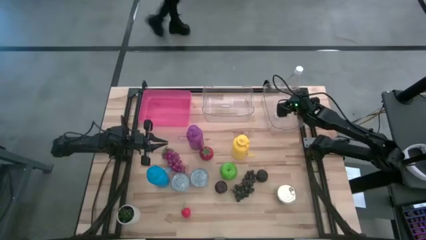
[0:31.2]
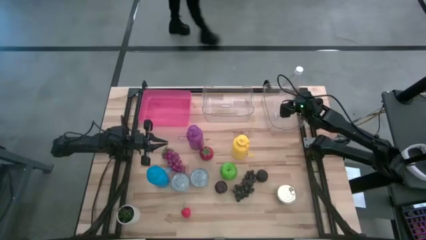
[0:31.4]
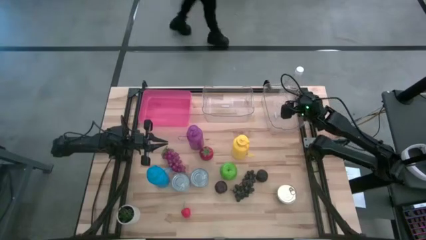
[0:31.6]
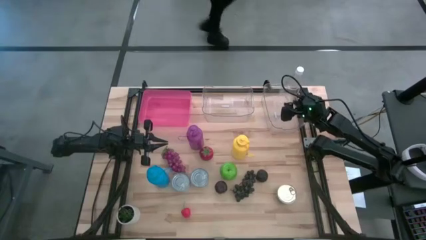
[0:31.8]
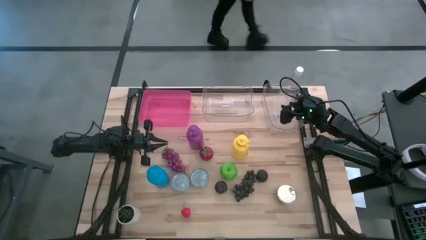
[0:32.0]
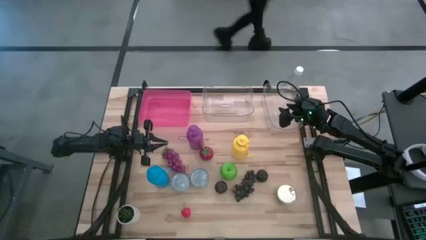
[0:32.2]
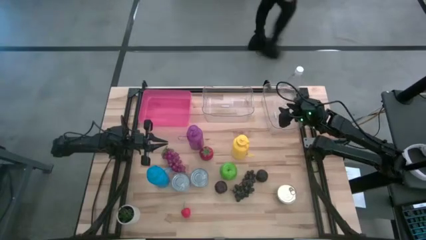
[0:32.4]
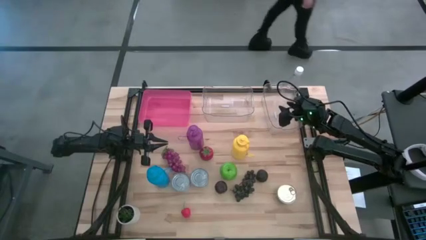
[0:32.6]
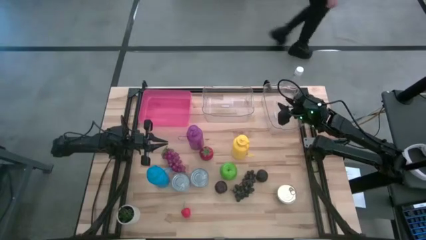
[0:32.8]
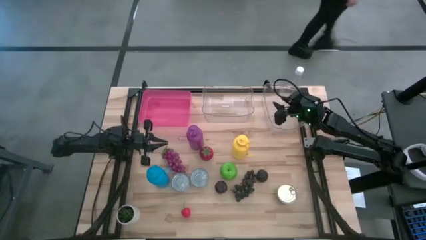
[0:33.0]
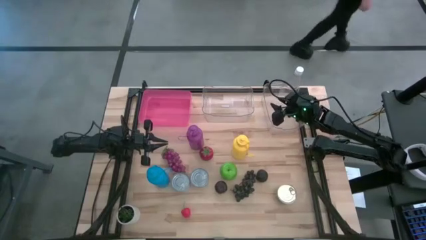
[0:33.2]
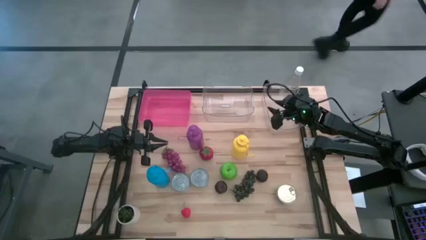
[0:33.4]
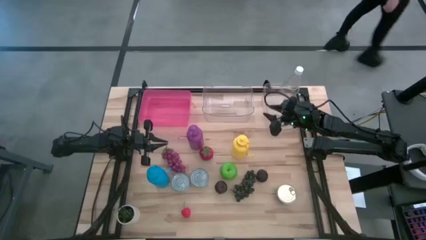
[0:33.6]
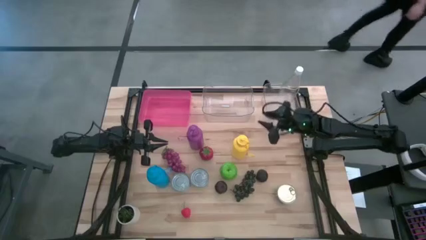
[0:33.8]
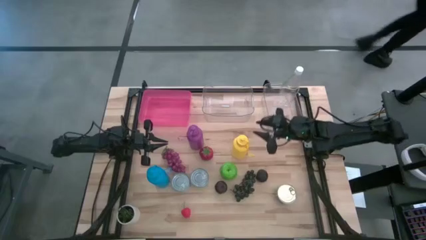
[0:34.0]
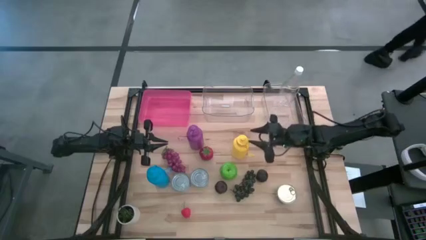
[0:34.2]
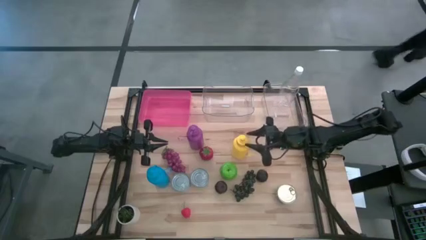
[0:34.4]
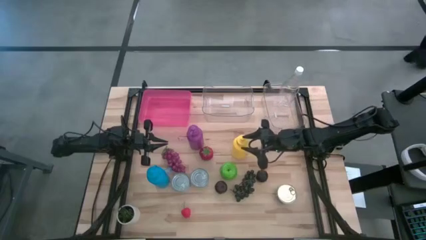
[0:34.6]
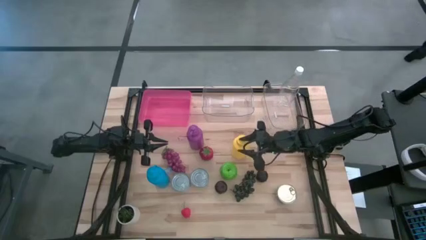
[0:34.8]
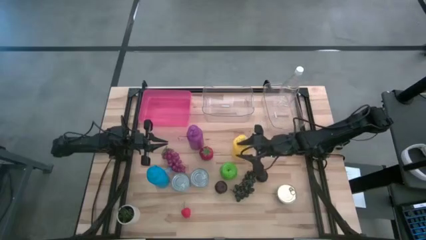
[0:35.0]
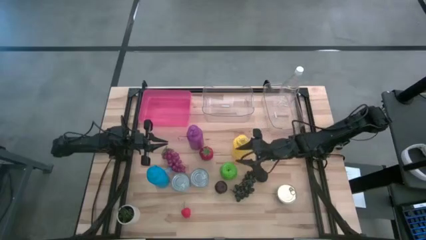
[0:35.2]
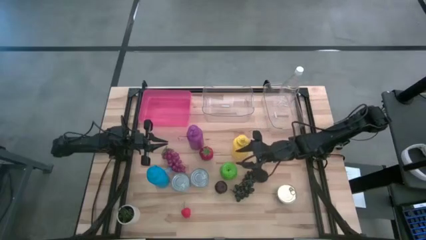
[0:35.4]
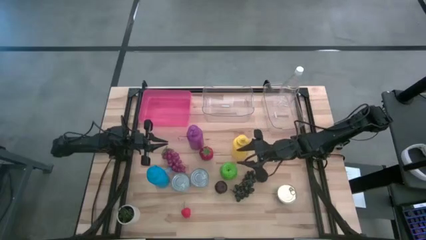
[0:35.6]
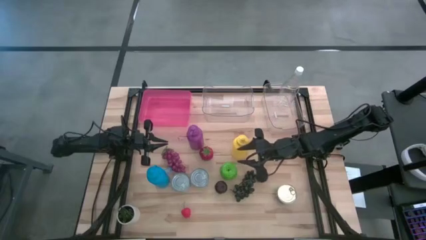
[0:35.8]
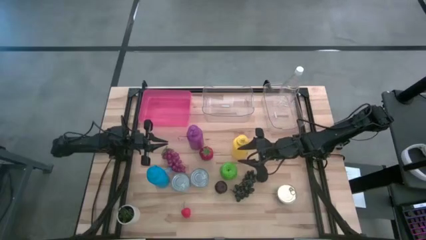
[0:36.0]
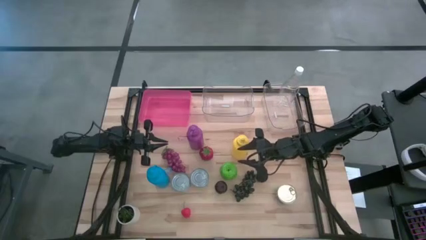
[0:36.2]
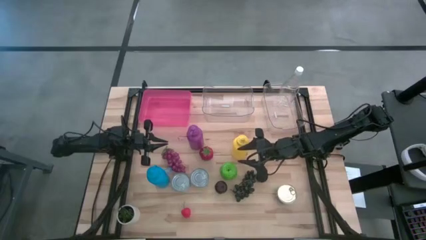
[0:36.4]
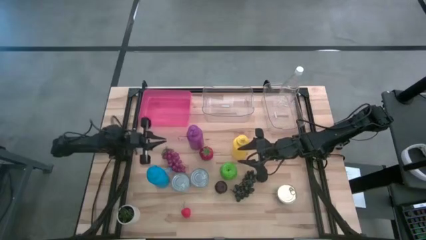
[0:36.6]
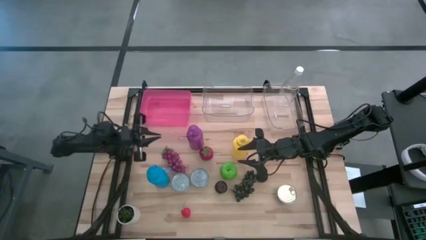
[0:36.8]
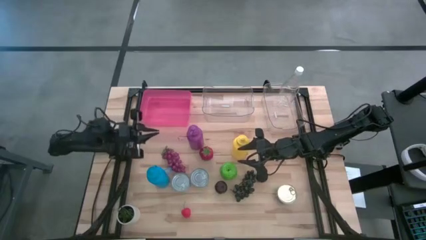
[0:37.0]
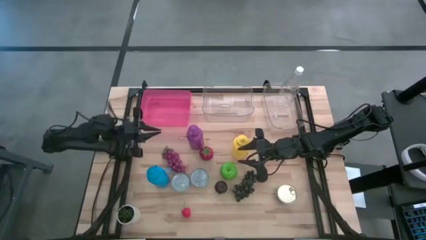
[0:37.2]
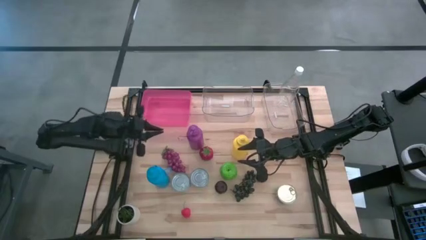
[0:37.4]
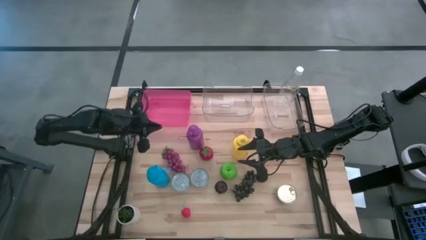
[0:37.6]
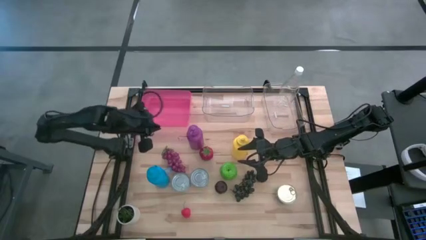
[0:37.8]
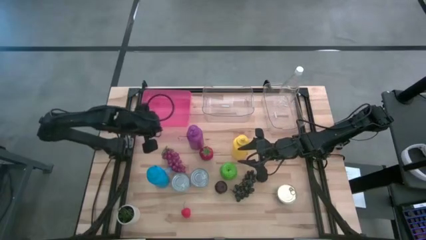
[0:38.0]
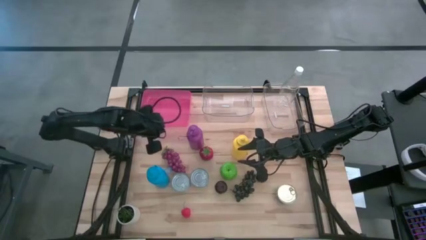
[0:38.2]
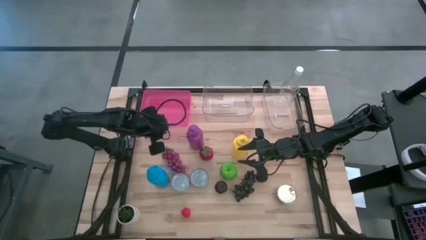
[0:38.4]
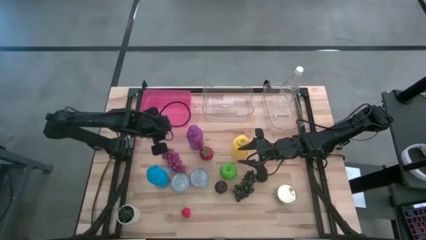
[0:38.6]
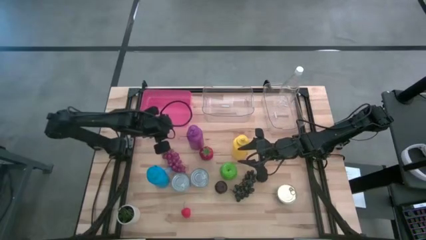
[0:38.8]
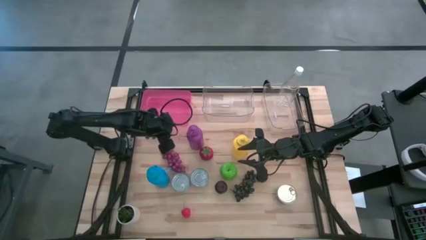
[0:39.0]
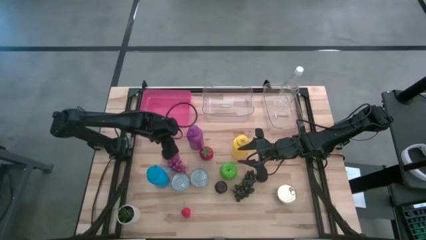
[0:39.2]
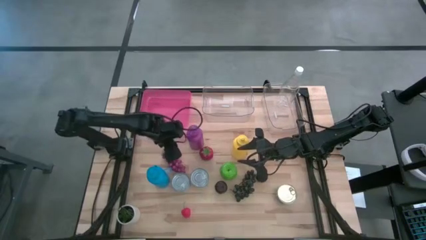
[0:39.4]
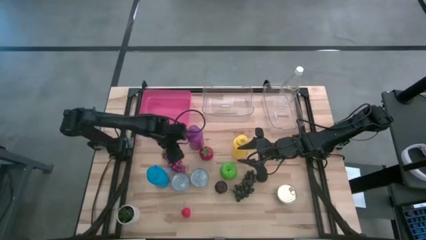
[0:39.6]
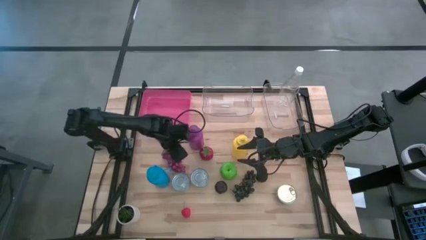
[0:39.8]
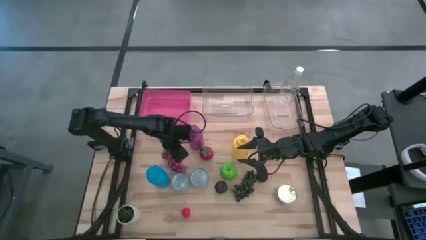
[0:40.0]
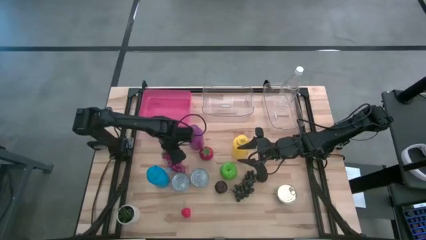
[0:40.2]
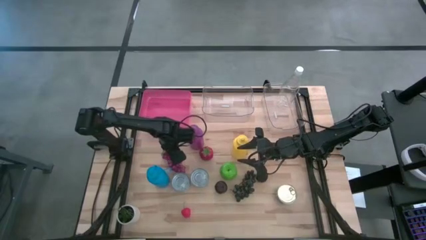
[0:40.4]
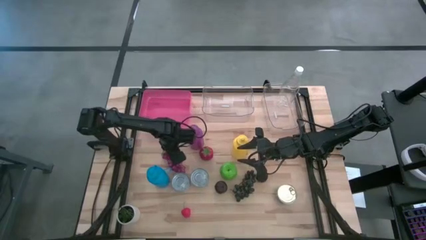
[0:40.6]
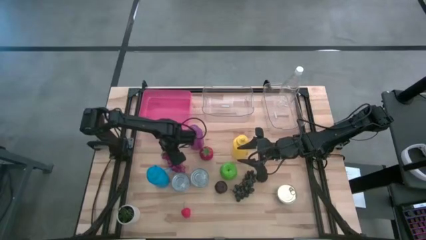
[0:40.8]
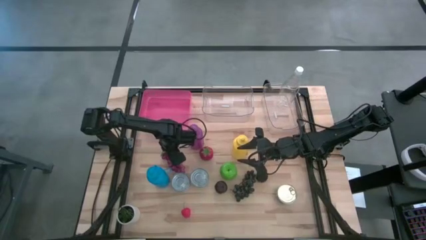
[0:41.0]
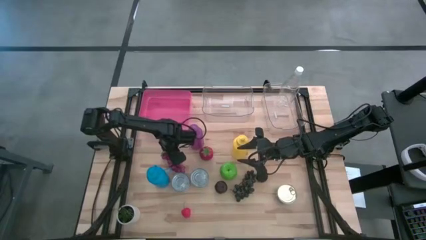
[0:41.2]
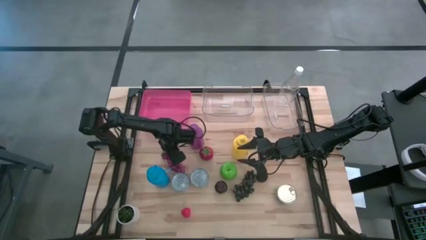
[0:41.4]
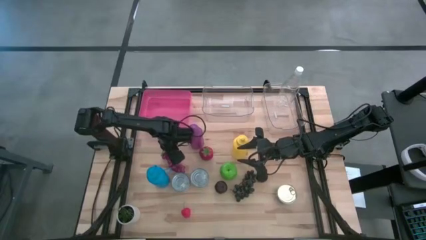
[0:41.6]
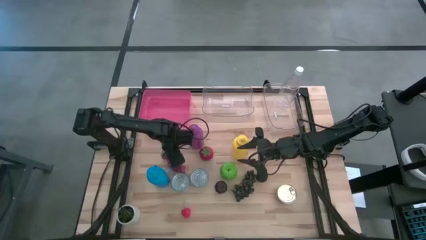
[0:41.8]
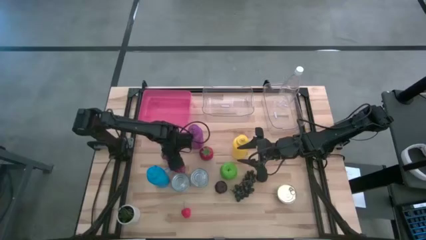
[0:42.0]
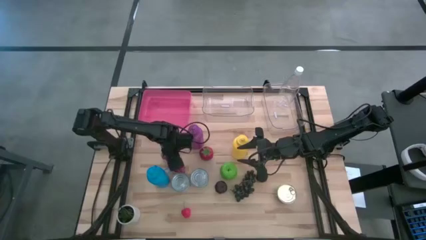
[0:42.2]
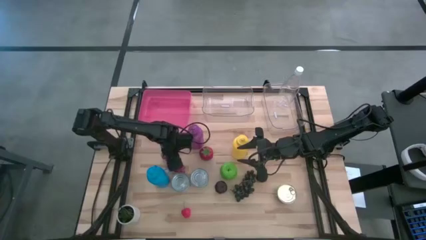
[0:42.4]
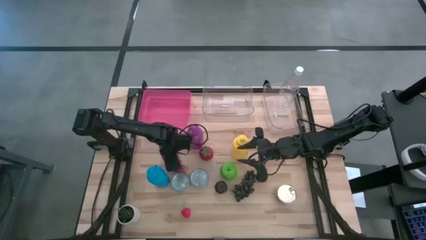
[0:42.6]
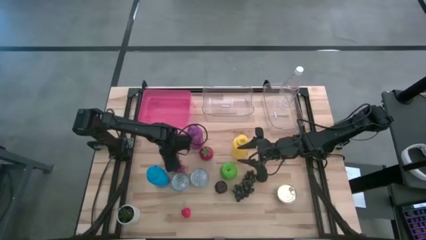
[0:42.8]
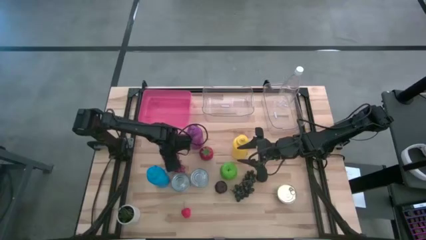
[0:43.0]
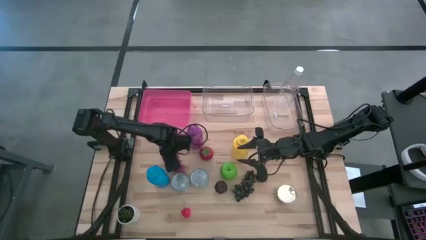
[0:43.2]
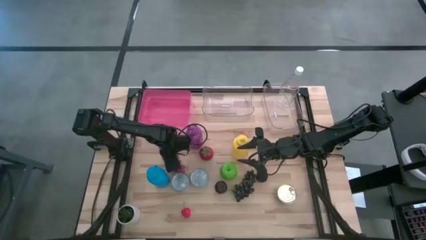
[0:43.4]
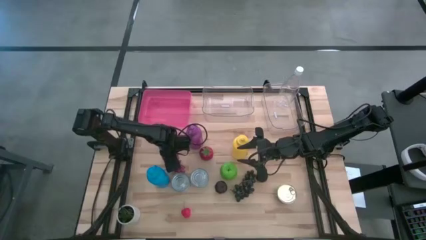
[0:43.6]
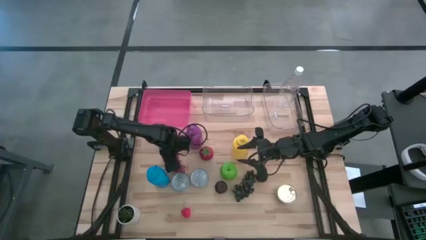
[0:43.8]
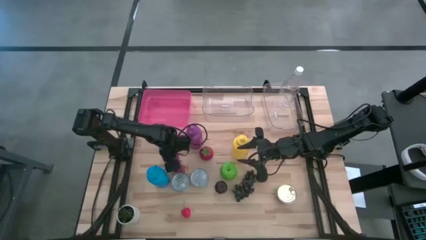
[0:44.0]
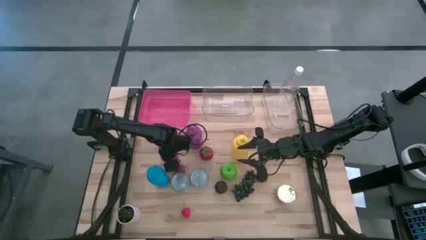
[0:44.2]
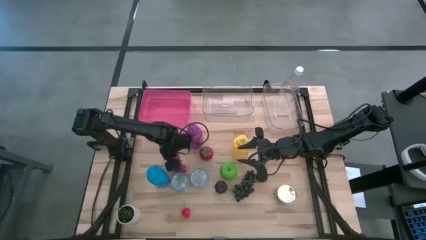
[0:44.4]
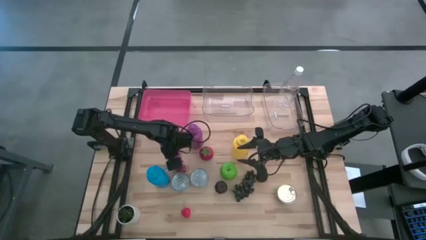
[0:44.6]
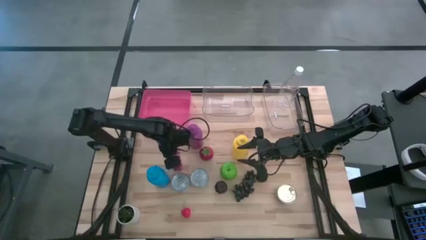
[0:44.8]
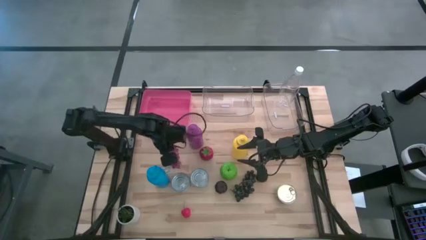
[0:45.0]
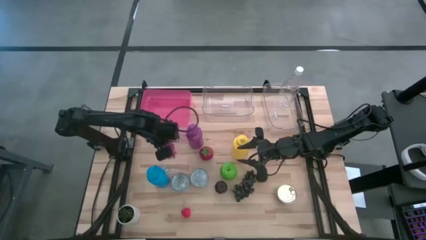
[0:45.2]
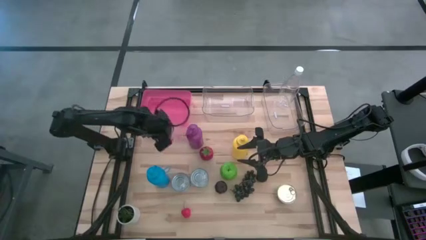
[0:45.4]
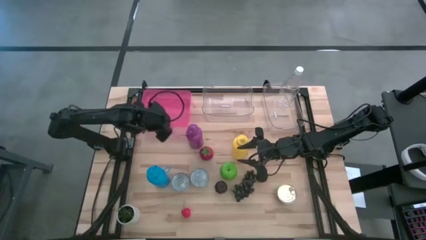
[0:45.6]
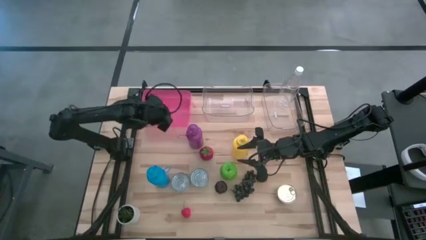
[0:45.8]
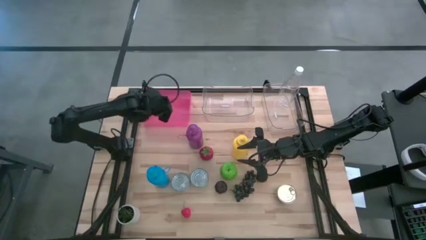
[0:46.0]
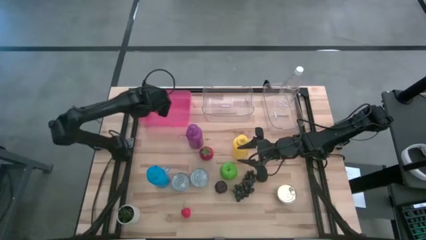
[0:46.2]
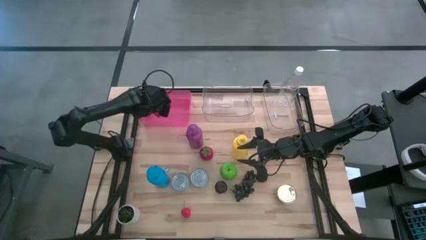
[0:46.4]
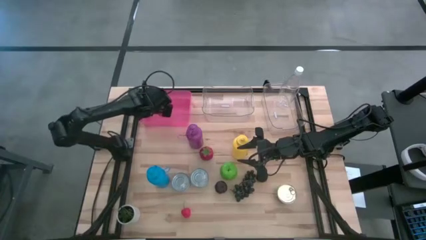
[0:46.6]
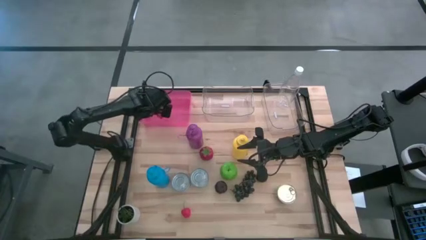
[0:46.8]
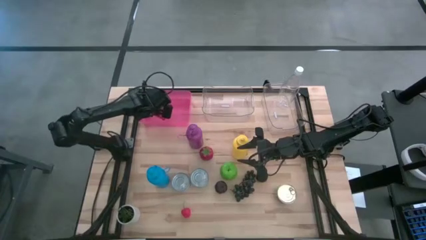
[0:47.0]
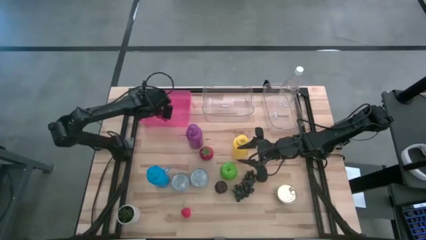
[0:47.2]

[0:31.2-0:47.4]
Task: Pick & Place Food Item
Put the red grapes into the red transparent bin
